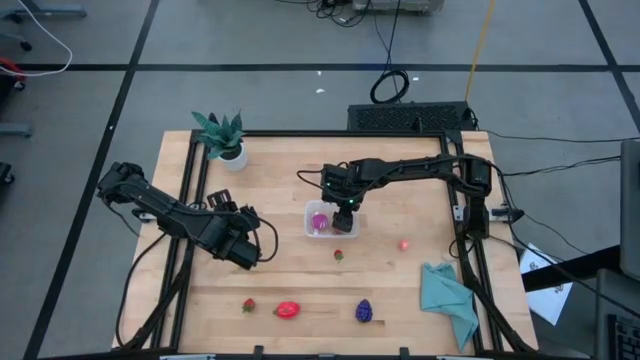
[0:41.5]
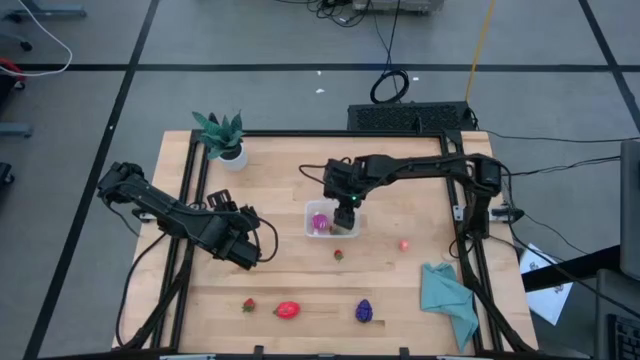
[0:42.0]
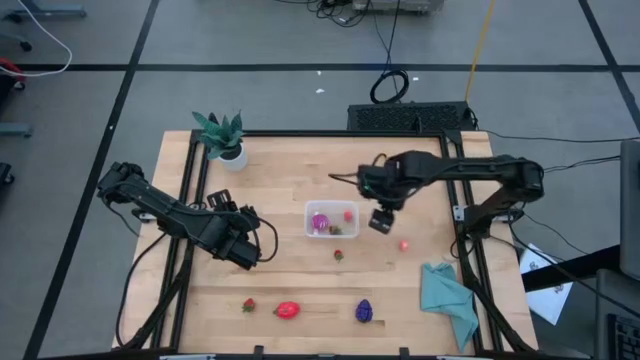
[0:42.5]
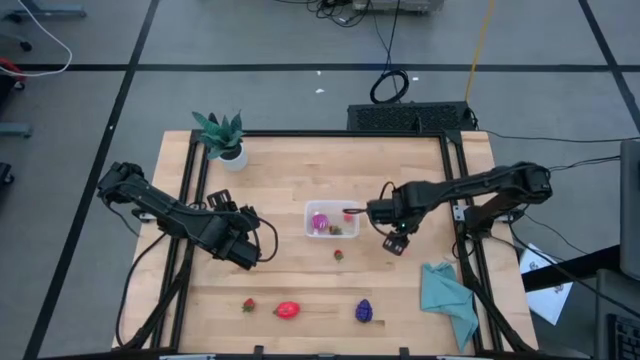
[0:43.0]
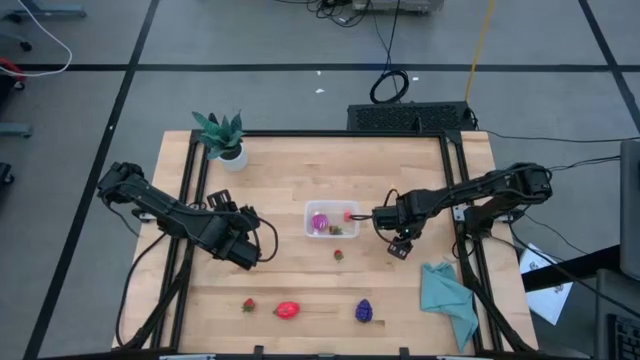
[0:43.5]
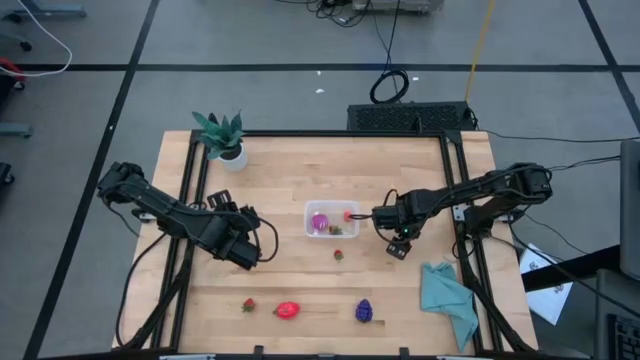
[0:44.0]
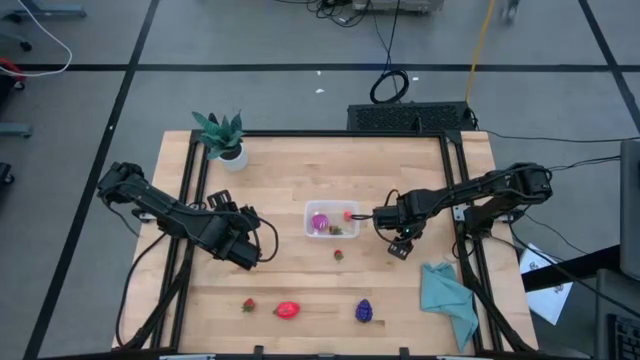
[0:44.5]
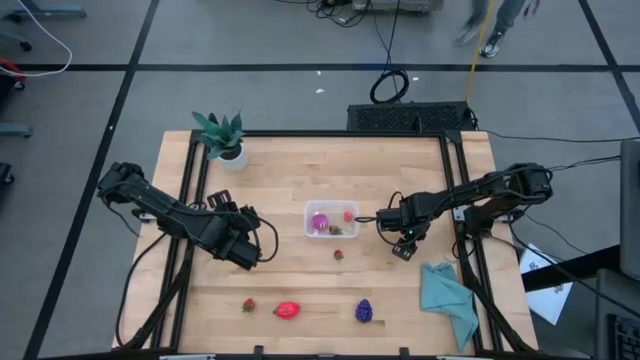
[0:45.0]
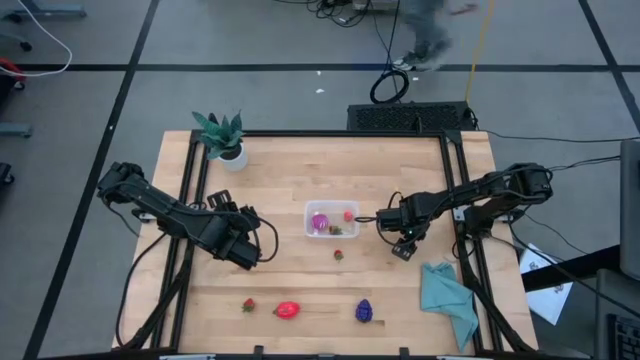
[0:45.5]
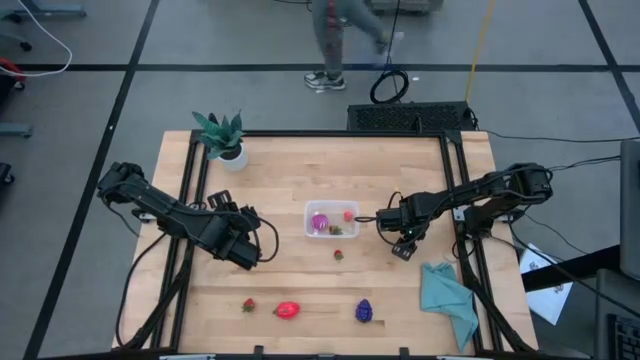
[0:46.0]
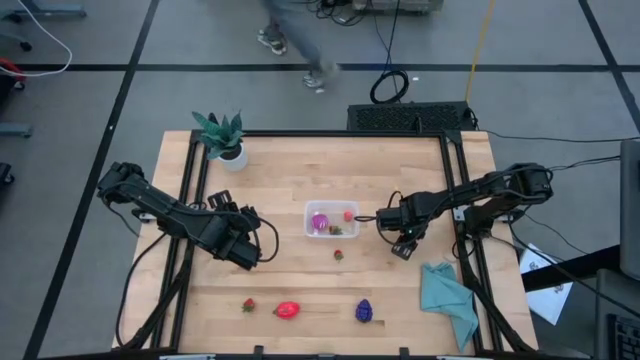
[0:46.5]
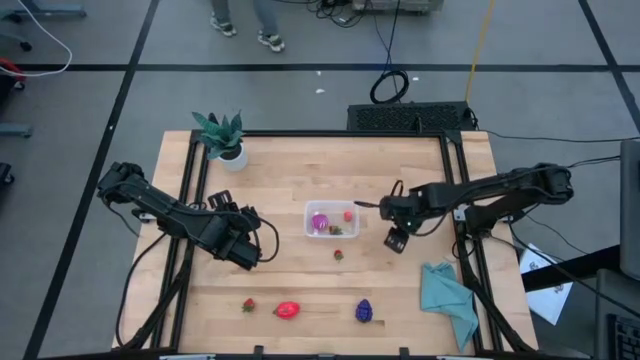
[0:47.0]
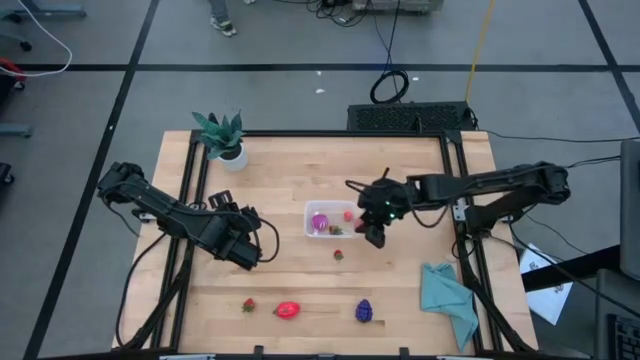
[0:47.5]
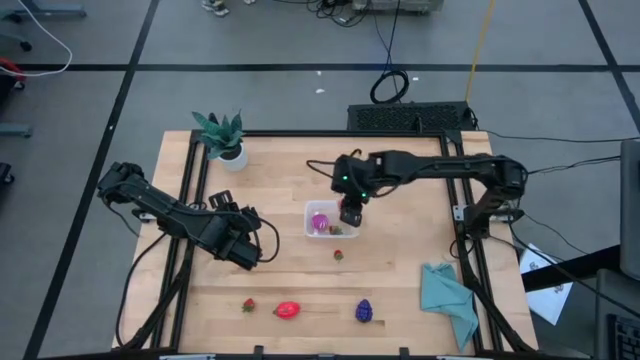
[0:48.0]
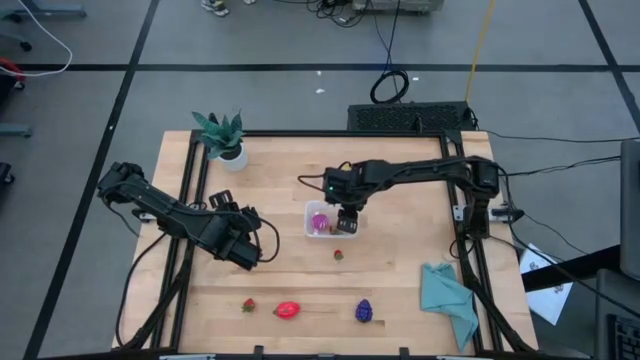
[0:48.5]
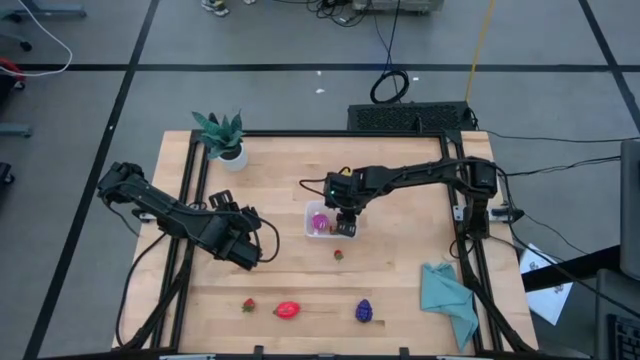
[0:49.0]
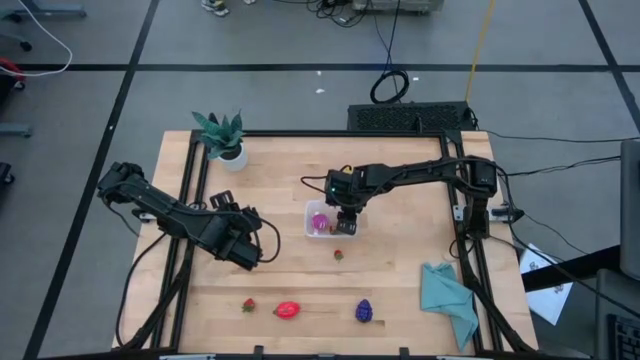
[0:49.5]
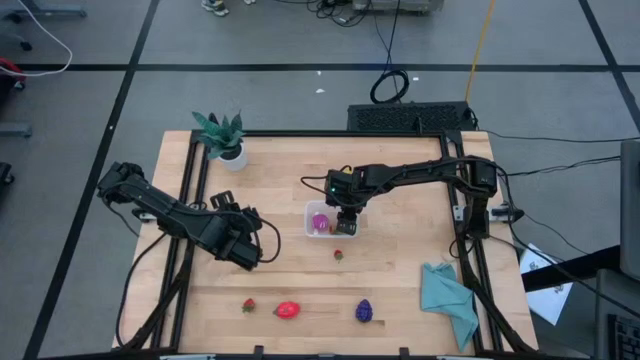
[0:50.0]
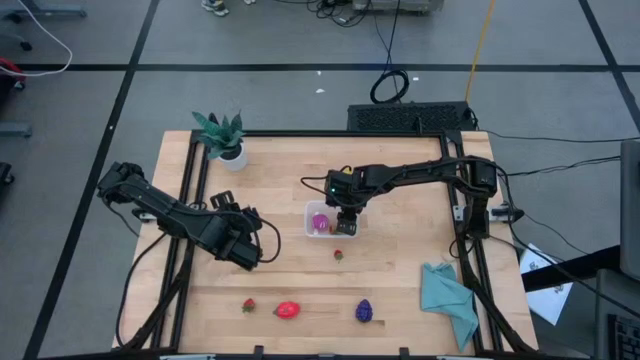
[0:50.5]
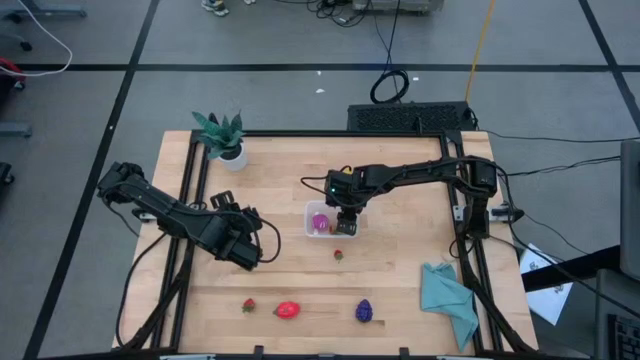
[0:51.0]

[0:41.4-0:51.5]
Task: Pick and placing Produce into tupperware
Put the pink peach into the transparent bin

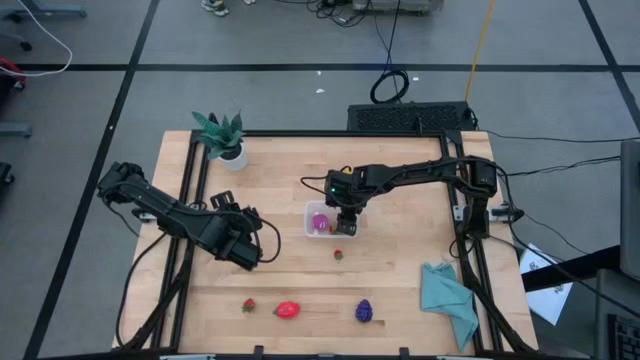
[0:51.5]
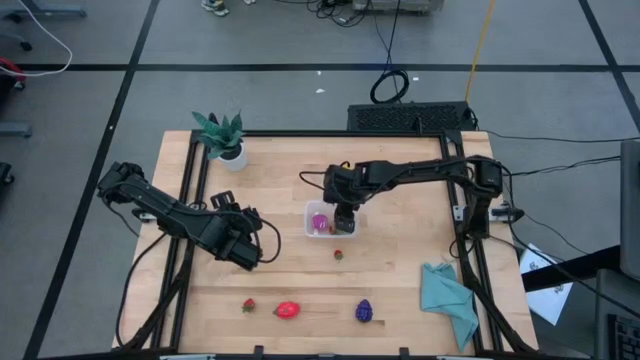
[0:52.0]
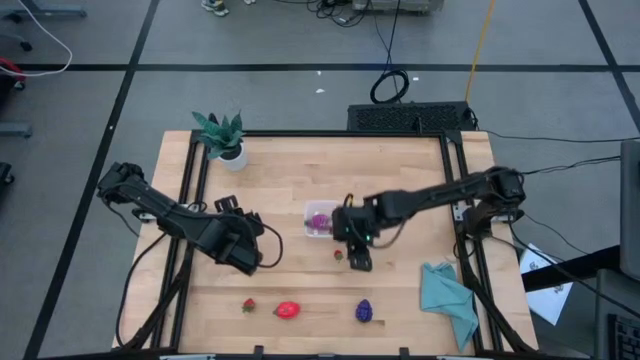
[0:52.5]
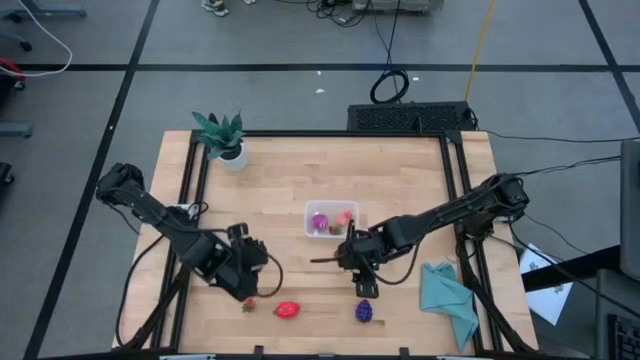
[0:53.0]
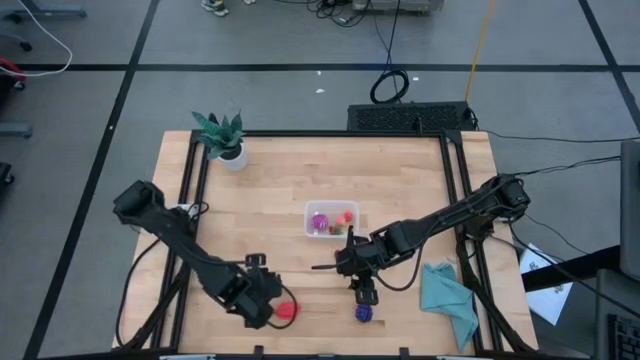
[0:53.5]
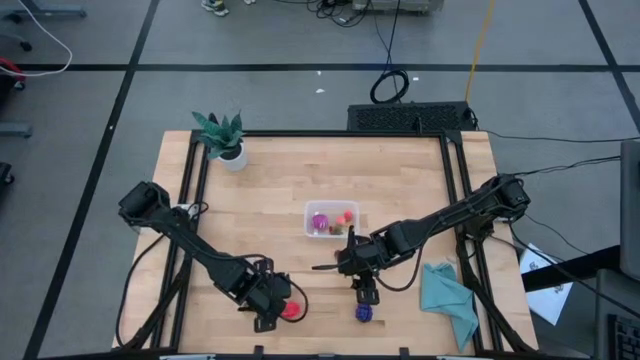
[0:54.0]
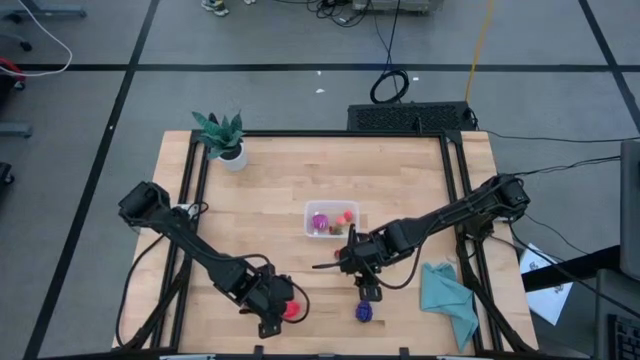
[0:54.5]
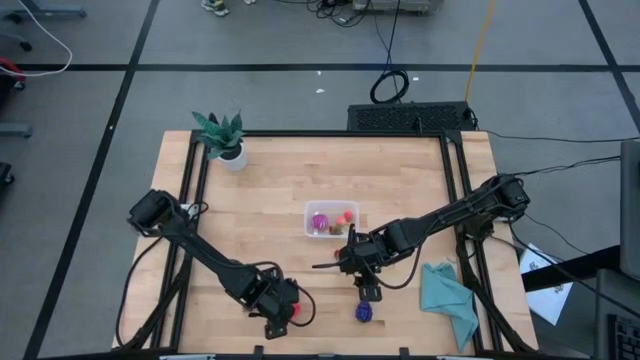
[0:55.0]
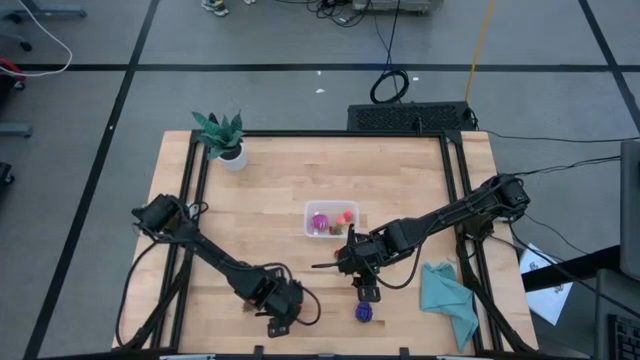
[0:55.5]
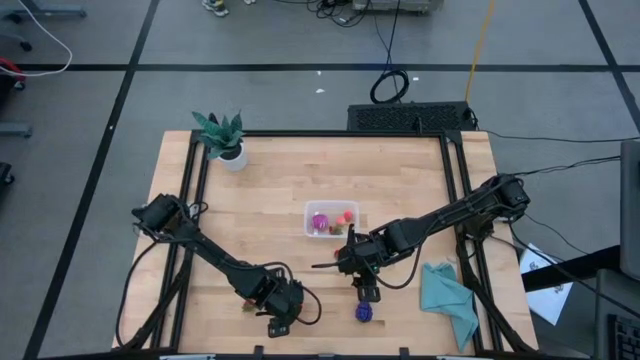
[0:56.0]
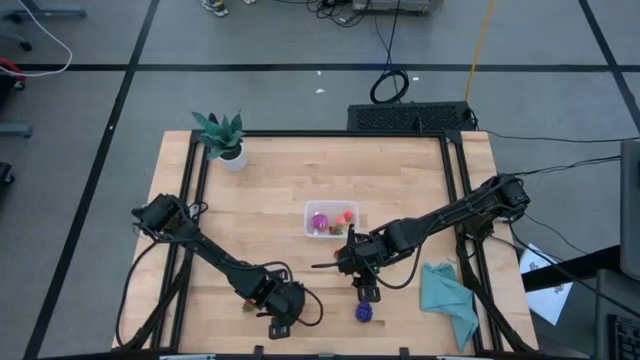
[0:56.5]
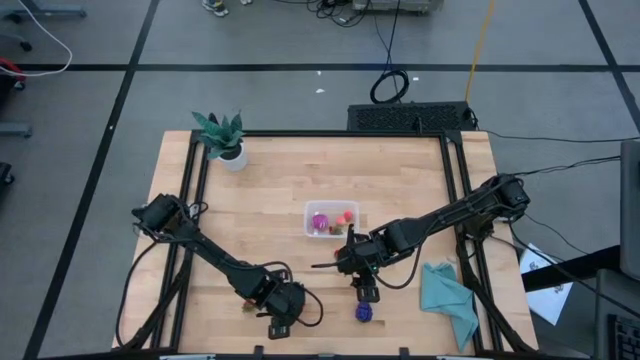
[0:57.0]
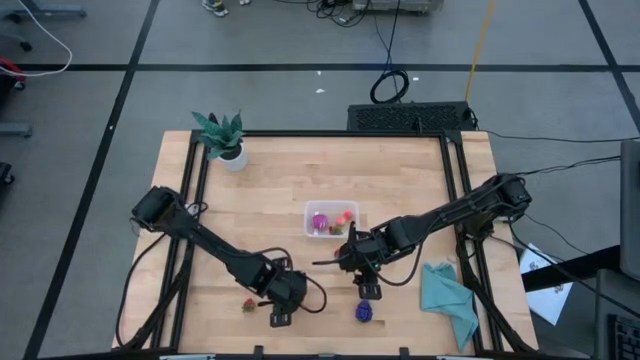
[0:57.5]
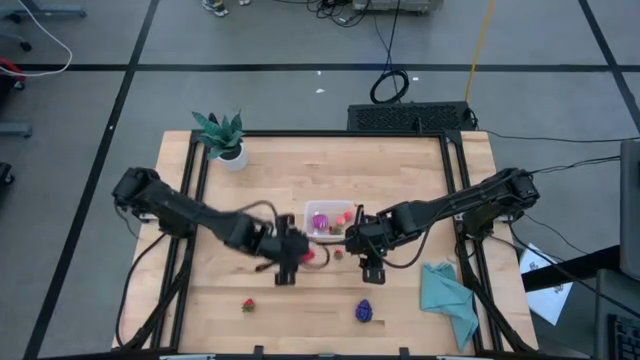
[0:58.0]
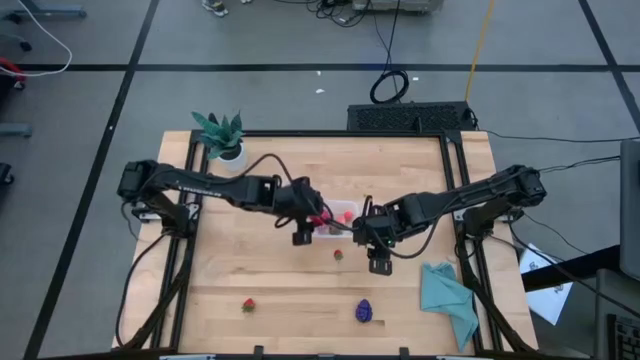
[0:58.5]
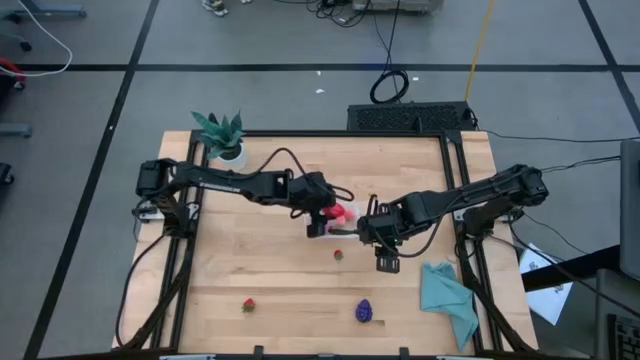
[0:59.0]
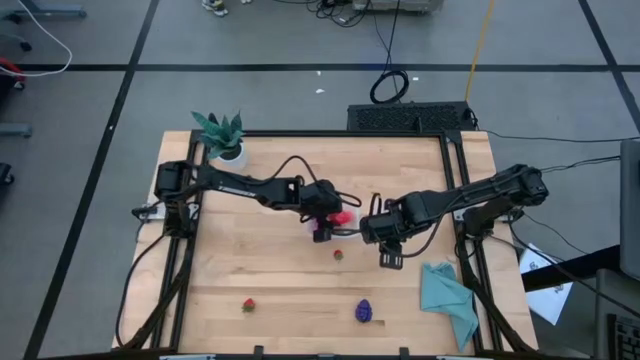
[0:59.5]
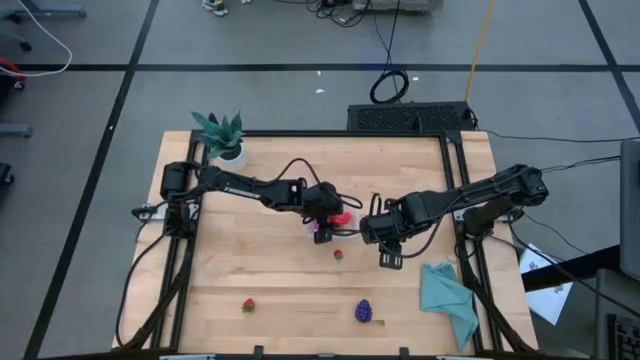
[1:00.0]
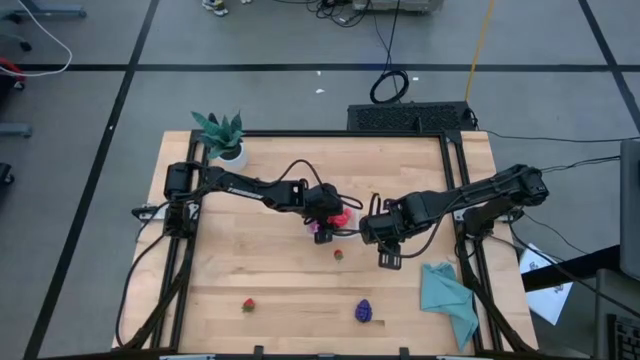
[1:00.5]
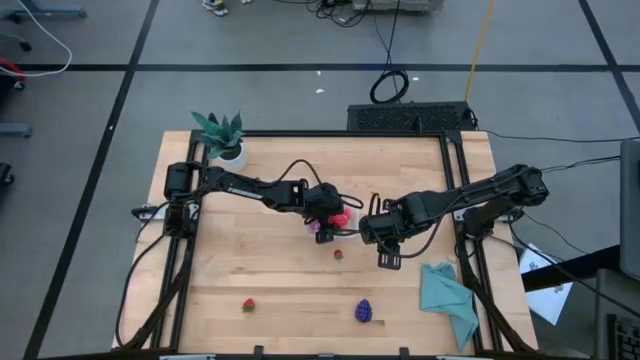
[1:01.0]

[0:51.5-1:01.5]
Put the pink dragon fruit into the transparent bin
